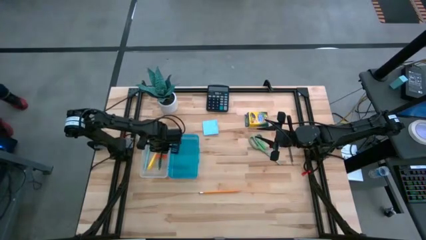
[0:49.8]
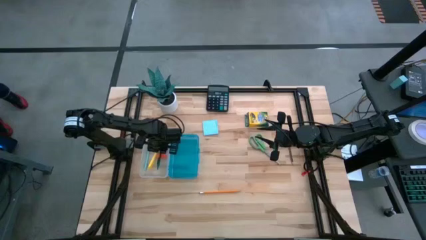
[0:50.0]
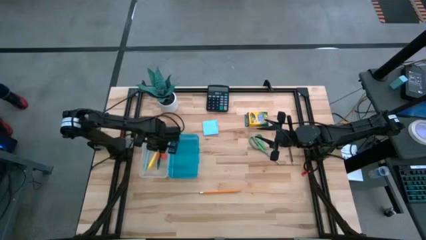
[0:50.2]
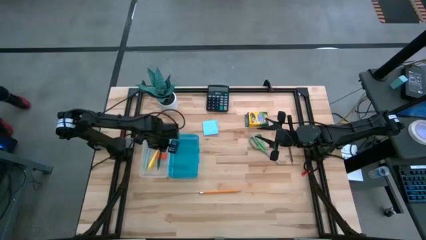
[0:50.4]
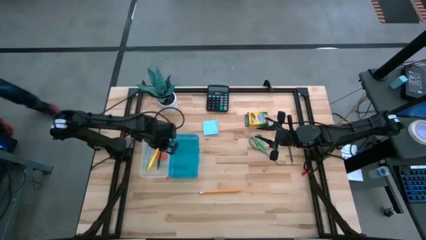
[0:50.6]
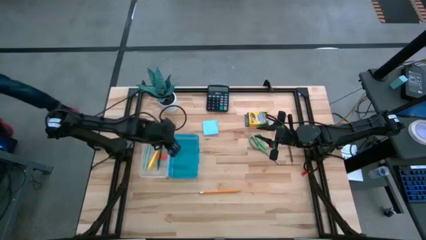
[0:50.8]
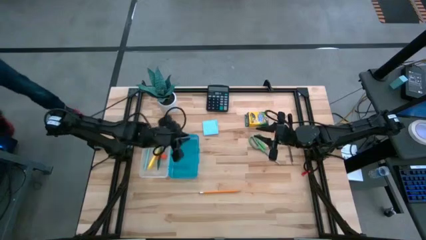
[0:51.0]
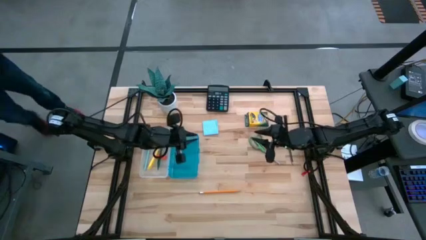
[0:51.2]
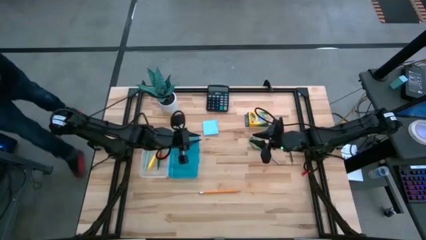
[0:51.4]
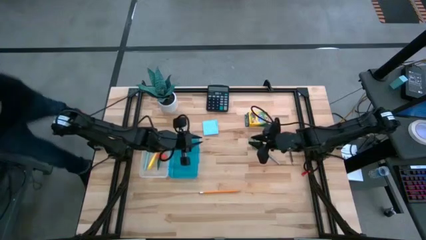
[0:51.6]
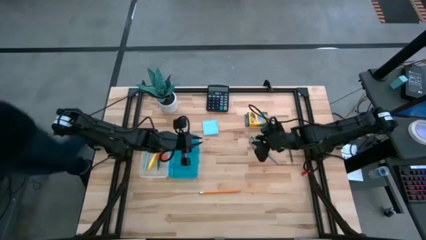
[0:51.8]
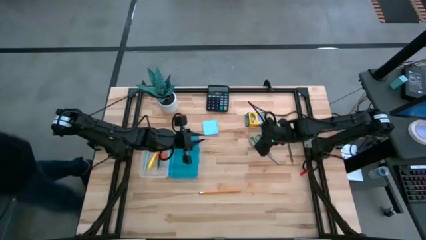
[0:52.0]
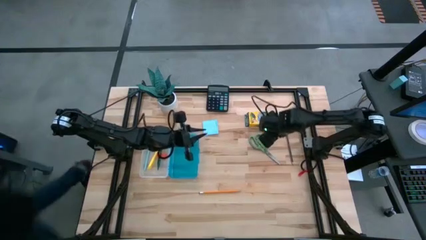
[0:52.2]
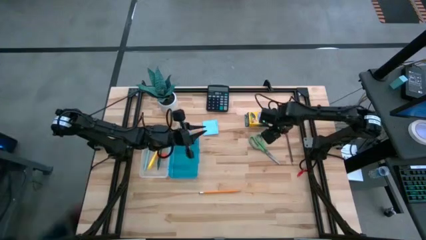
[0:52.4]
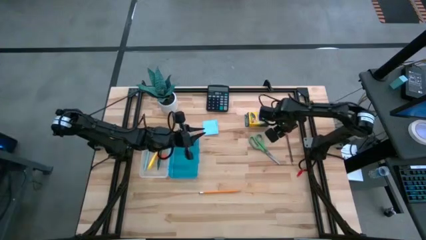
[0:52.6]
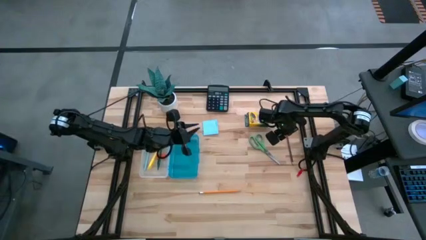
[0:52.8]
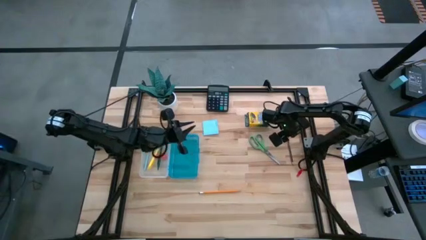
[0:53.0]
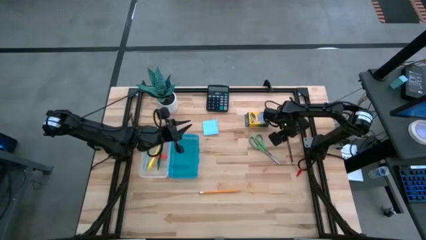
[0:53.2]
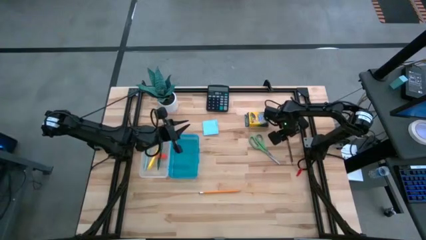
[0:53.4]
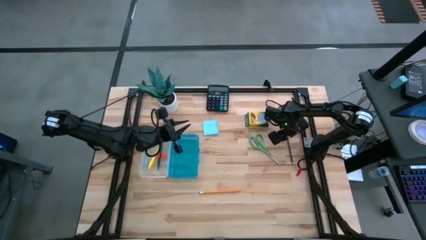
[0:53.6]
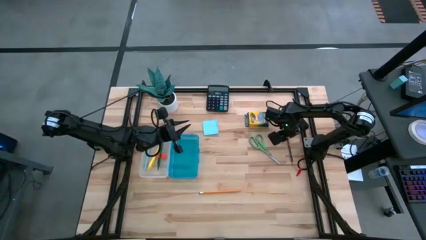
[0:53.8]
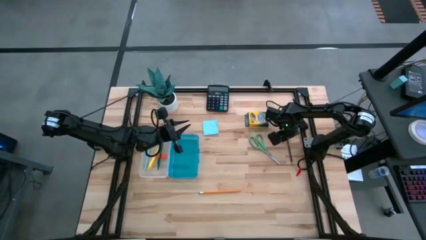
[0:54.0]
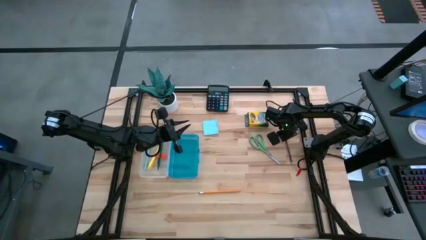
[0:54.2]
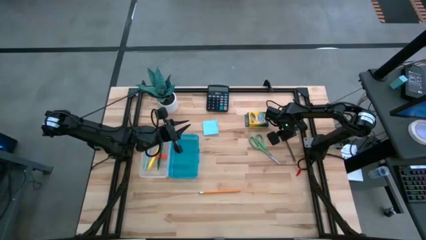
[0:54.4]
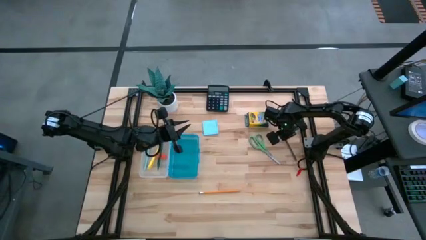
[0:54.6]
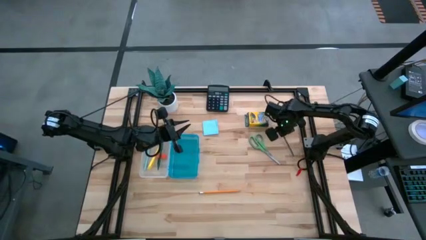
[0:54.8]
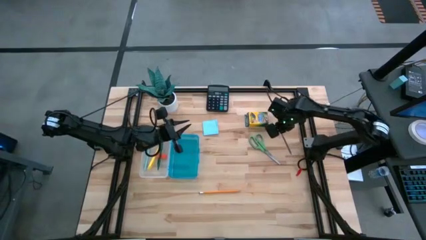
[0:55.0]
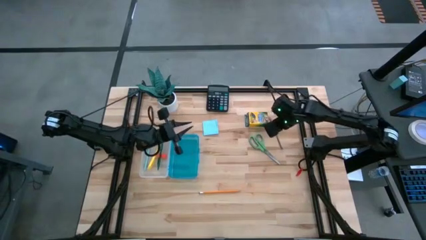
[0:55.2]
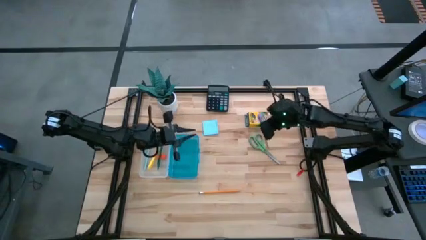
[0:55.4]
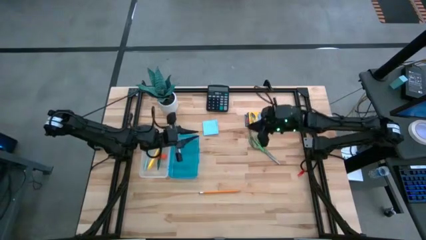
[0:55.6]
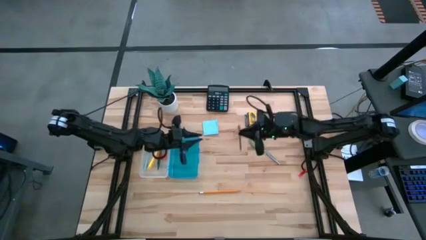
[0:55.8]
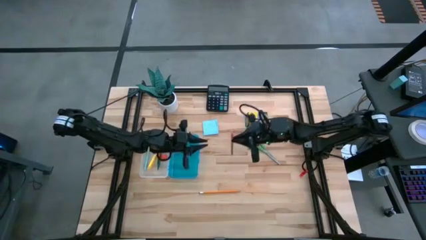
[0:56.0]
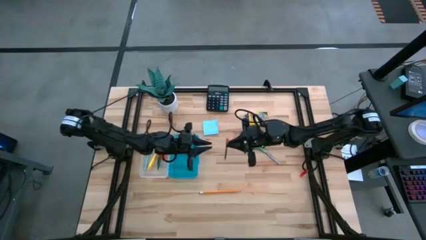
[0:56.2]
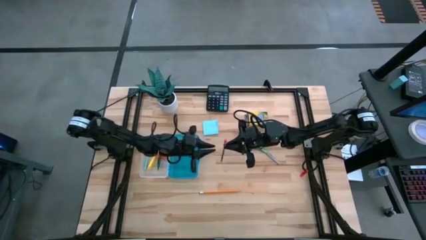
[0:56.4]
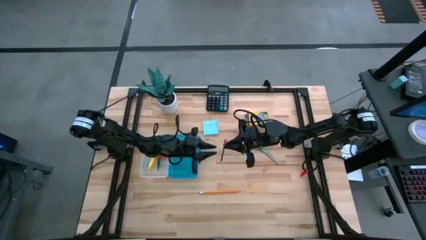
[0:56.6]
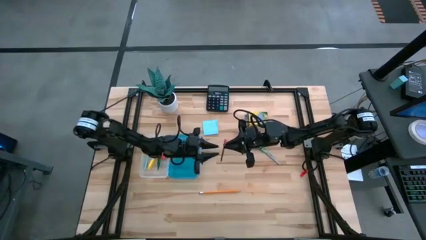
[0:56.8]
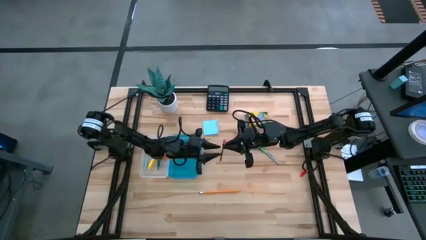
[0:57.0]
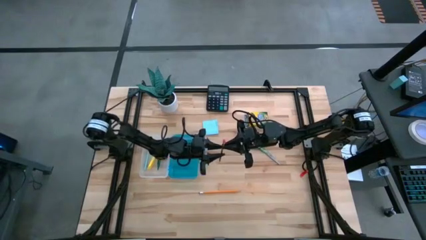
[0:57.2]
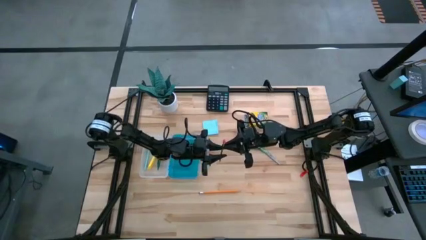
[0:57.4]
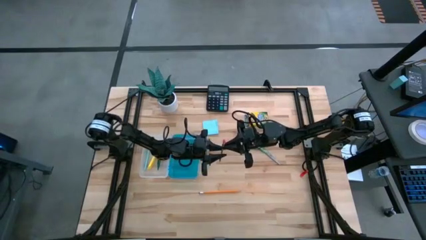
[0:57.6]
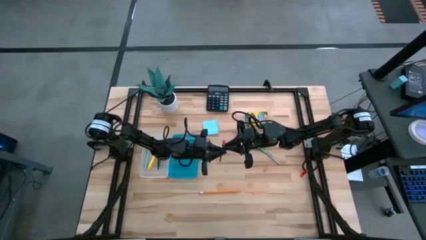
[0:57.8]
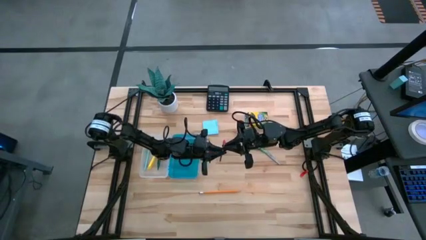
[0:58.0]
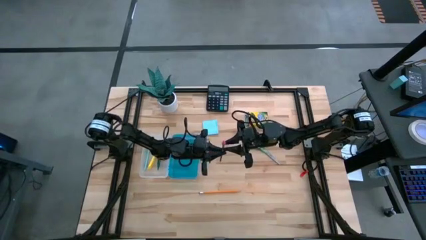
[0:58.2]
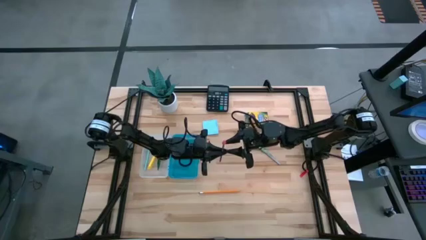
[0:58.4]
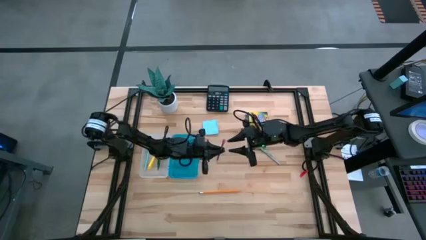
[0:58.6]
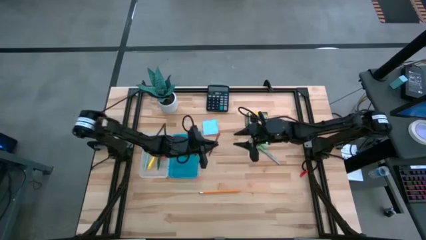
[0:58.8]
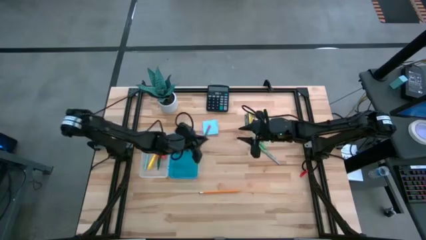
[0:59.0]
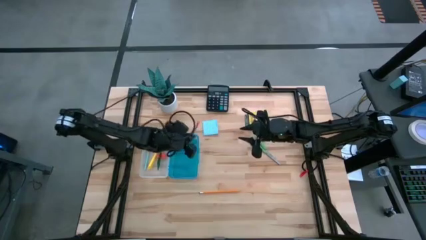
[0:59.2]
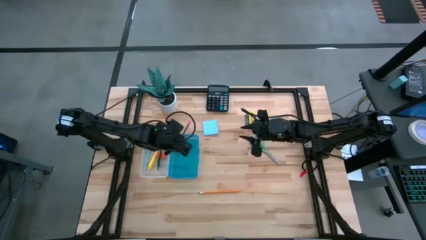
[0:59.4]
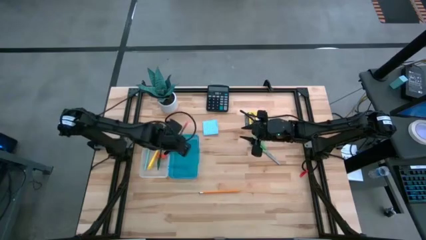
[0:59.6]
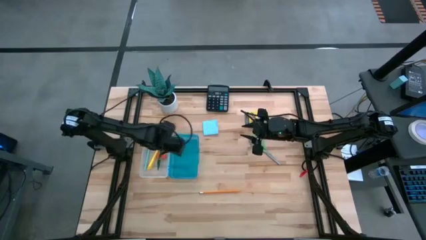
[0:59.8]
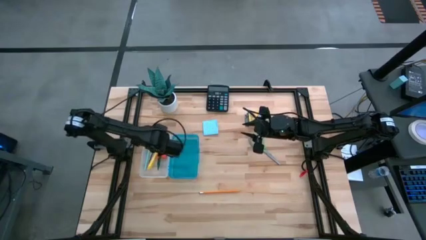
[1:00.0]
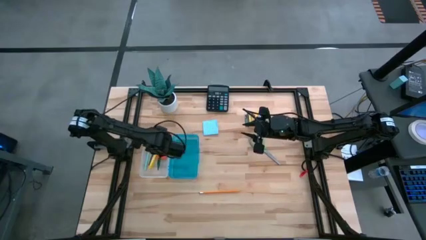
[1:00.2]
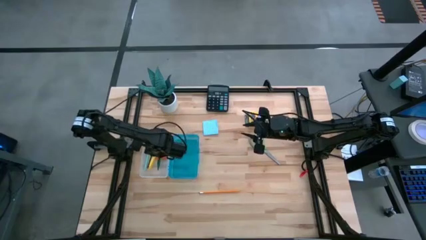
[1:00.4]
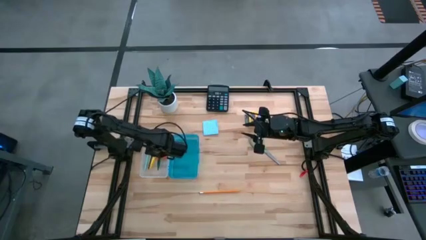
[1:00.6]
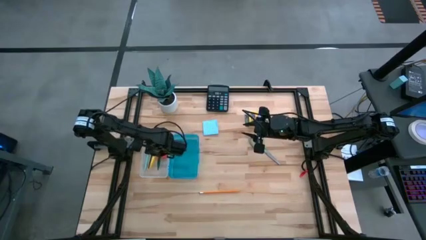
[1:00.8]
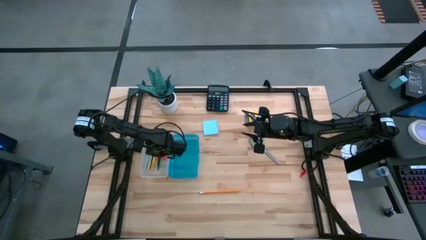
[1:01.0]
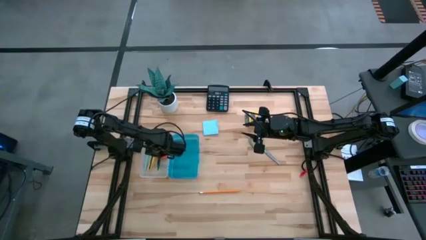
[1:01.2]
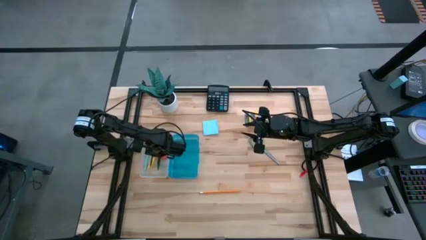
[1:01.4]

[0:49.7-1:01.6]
Task: Pack school essentials
Put the blue pencil into the blue supply box
